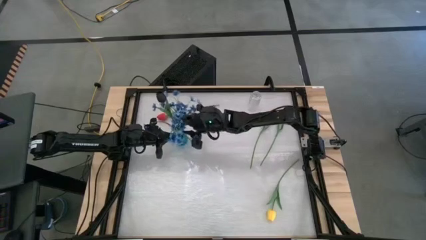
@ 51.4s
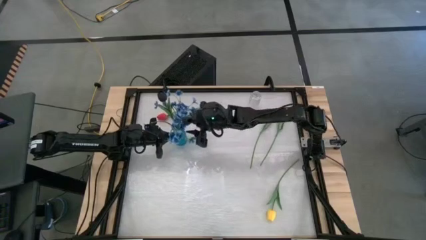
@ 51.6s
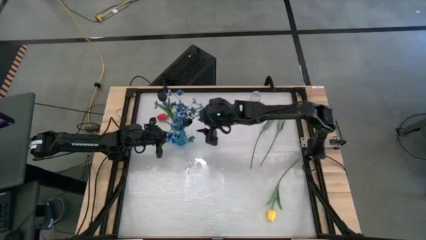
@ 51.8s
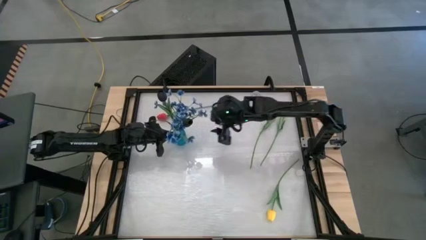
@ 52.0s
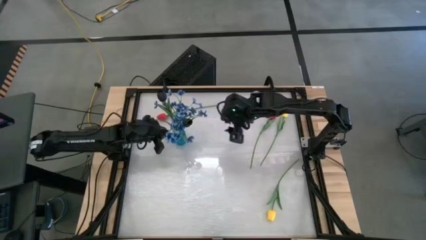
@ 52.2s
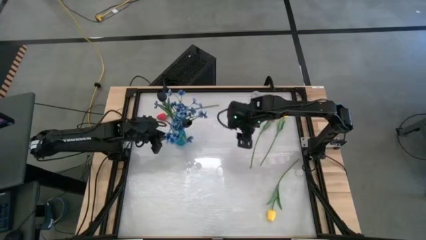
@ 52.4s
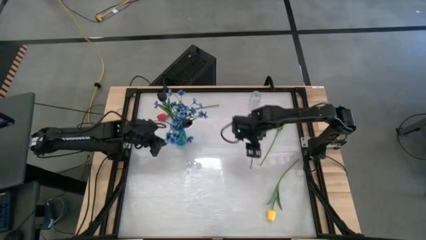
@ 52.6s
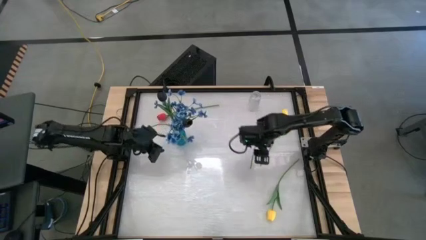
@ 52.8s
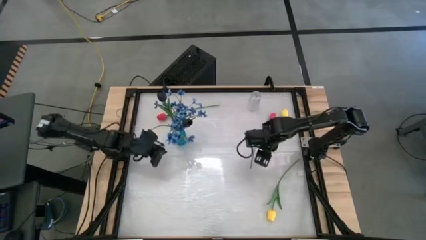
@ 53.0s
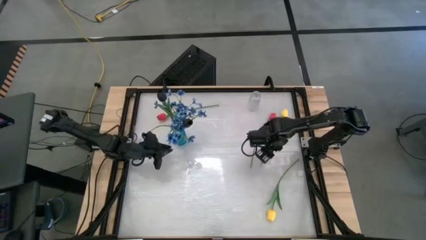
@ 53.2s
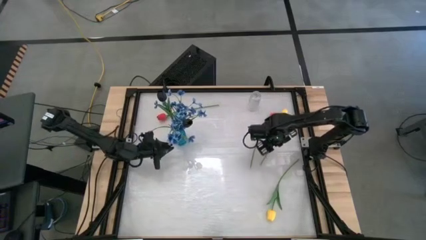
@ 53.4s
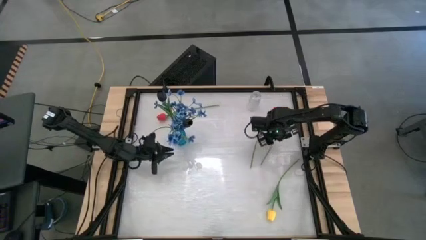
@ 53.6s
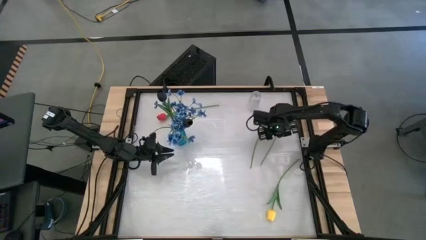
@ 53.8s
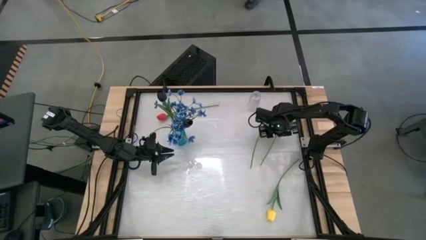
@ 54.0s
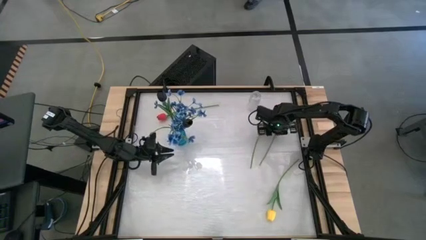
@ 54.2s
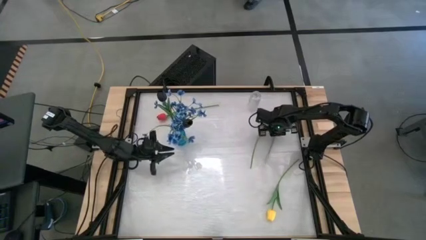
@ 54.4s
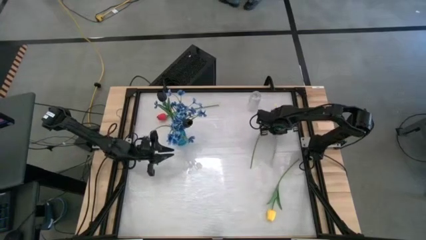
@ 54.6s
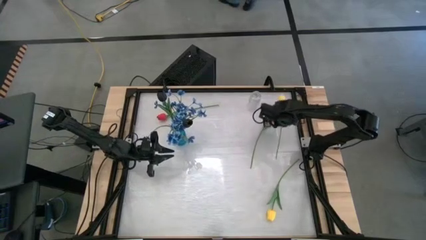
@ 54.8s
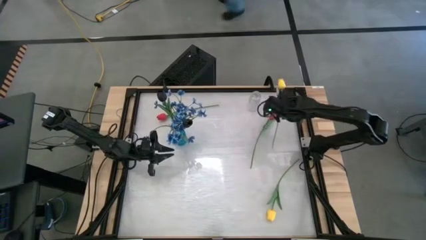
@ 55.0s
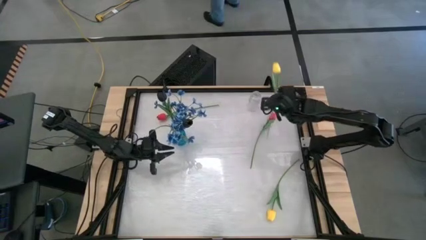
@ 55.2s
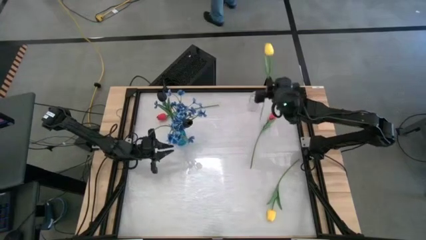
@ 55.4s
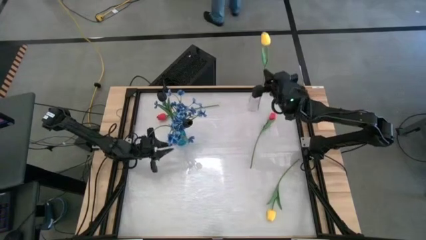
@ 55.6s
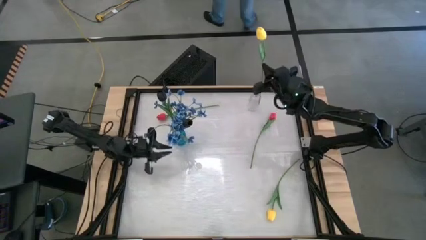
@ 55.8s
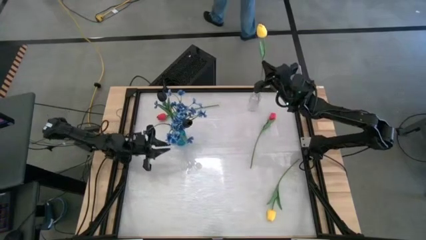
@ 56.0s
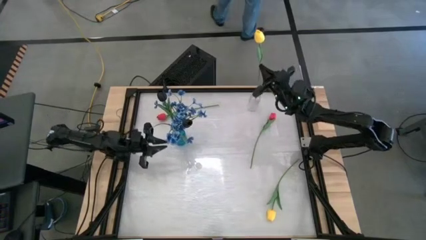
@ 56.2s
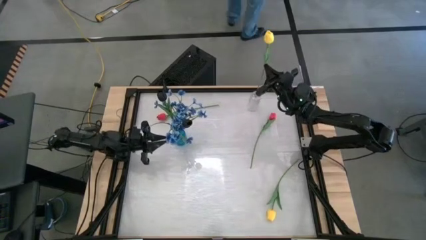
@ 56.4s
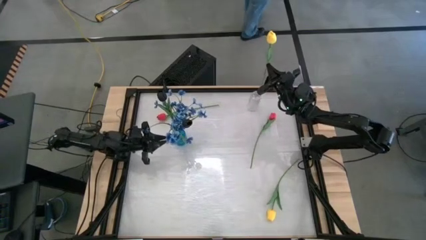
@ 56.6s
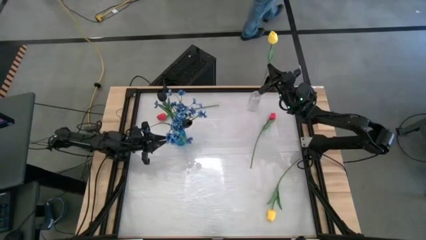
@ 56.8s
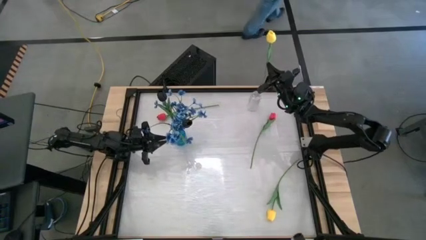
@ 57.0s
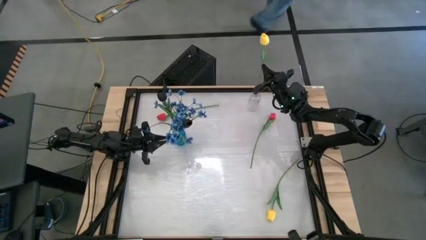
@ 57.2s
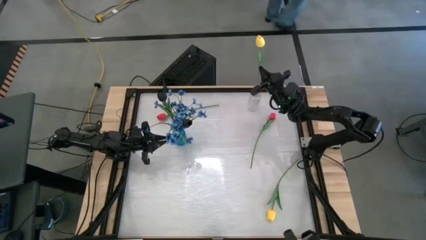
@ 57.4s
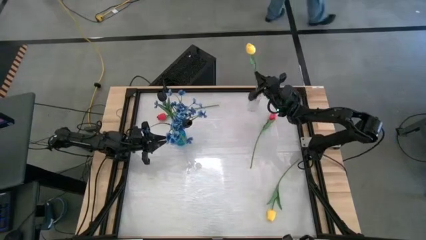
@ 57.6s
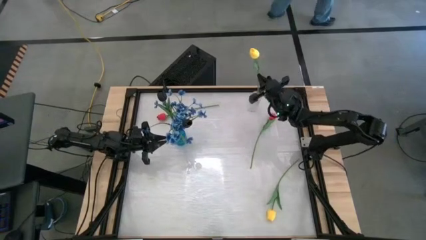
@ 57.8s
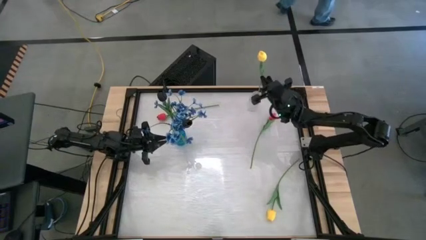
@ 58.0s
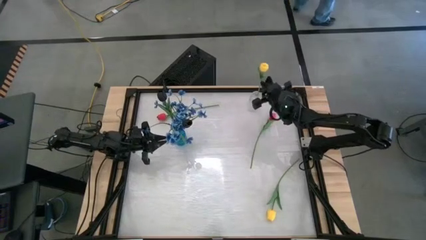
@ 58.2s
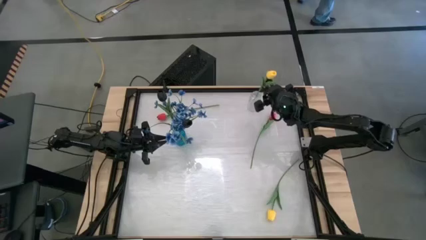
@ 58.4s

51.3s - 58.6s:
Task: Sort flowers into vase by color
Put the top yellow tulip flower into the transparent vase

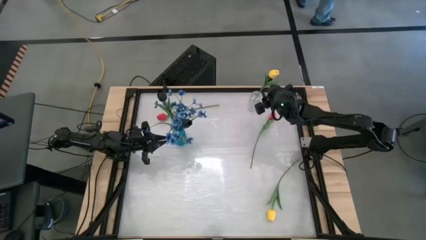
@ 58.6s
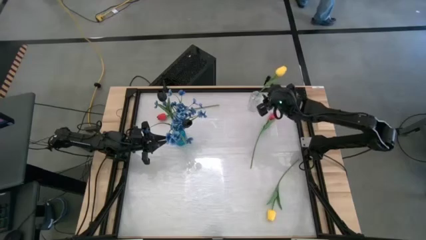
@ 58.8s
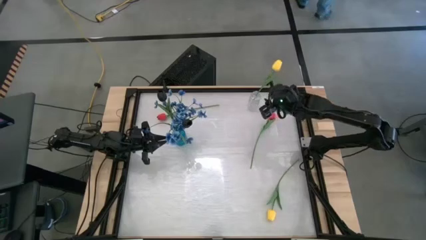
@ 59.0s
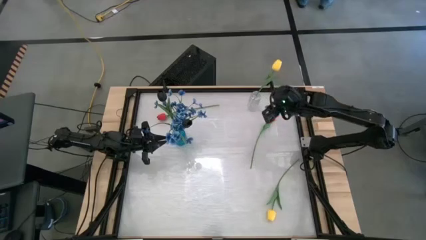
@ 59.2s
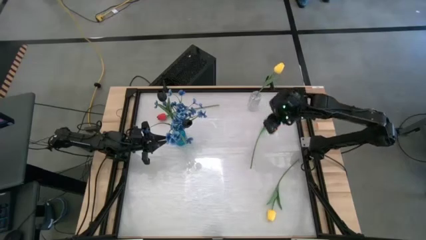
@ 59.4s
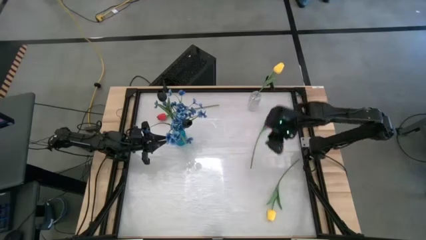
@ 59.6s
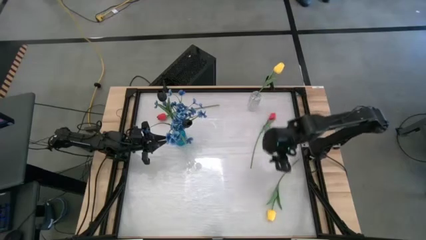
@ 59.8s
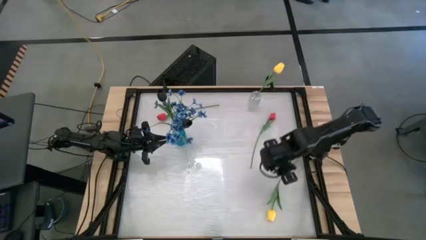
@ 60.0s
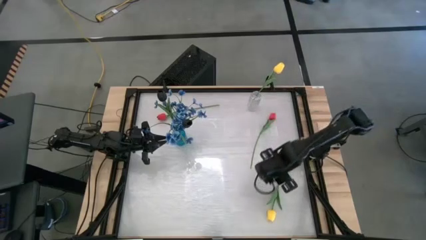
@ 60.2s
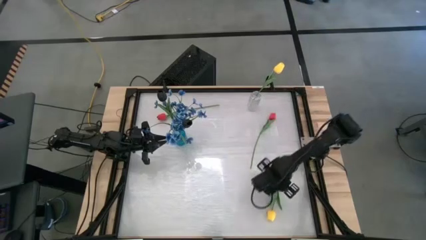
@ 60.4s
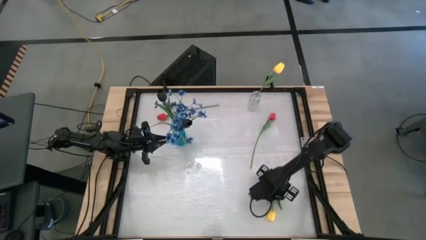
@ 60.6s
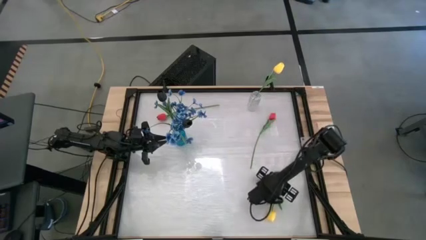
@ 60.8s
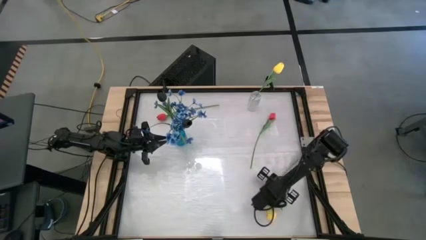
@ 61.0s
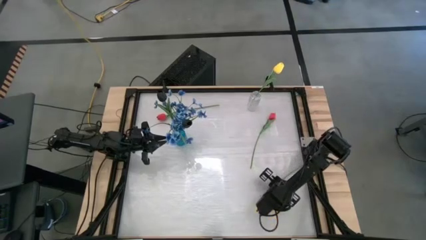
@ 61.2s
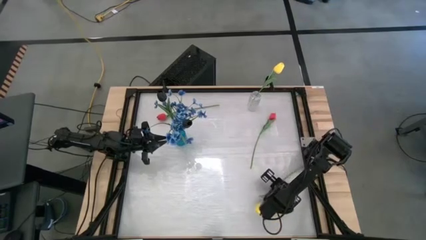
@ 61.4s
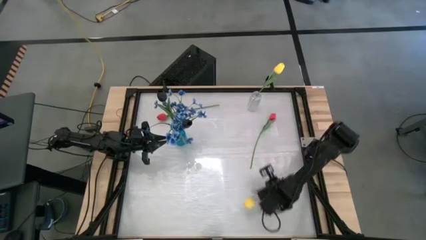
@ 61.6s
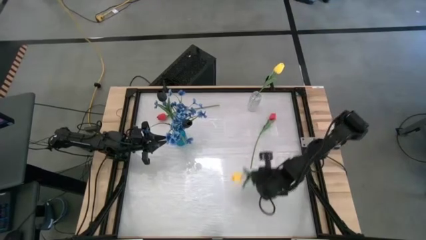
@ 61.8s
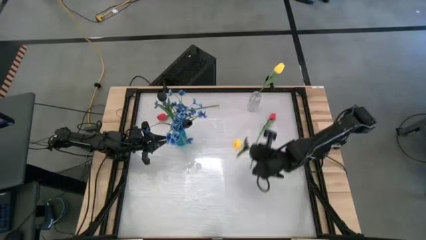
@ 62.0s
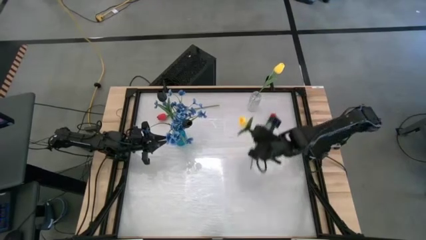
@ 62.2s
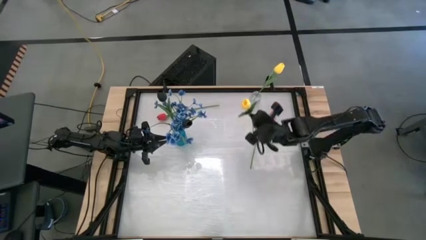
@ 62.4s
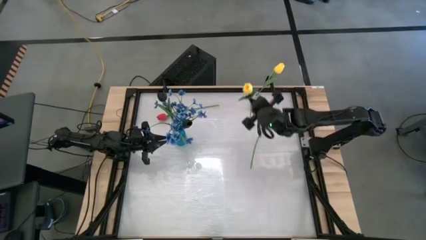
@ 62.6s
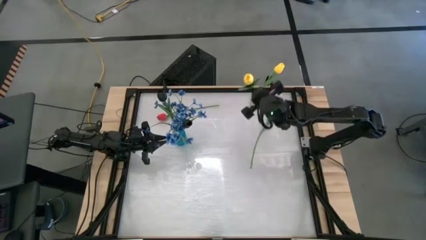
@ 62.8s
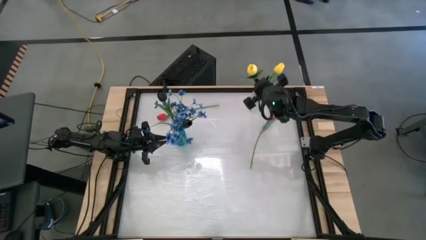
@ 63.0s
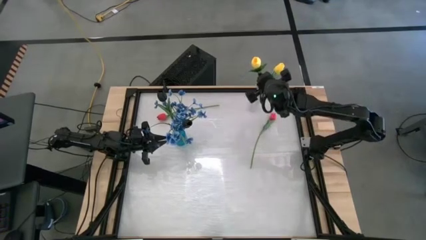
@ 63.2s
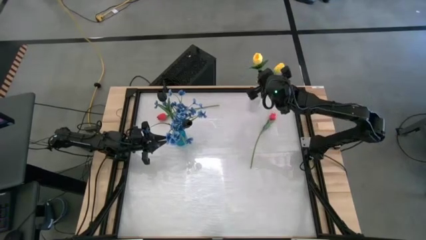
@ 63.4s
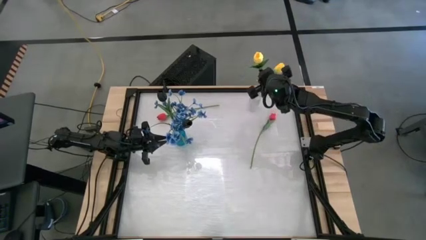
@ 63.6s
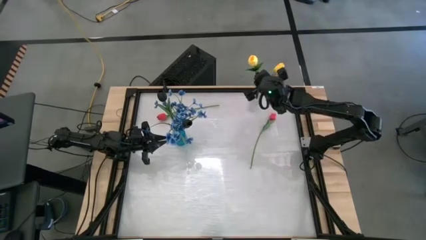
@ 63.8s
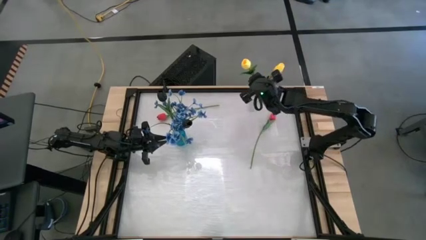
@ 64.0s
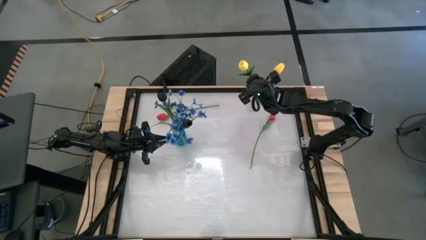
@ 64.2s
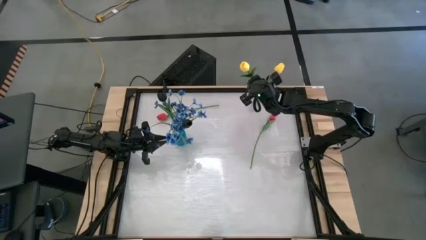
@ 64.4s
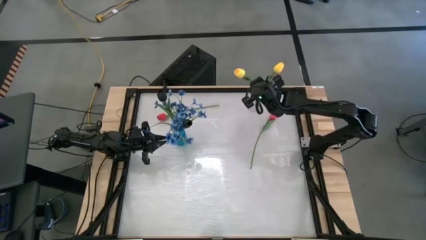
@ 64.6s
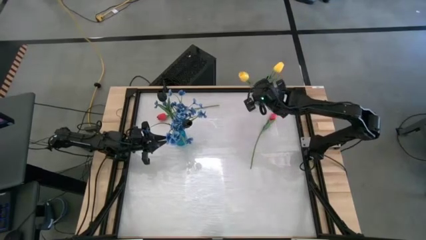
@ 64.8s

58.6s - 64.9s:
Put the yellow tulip flower into the transparent vase

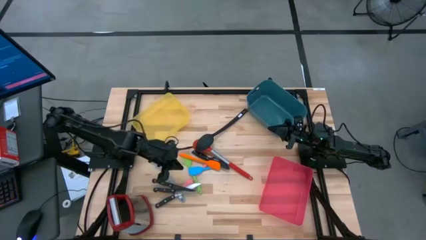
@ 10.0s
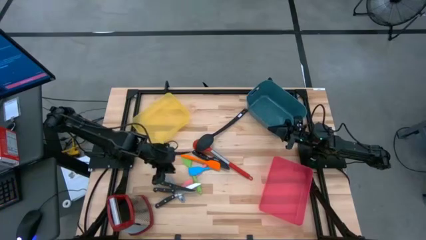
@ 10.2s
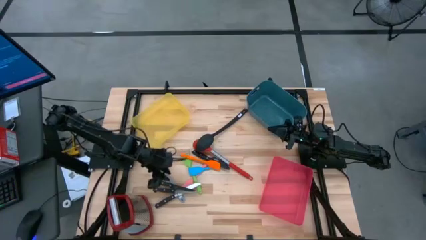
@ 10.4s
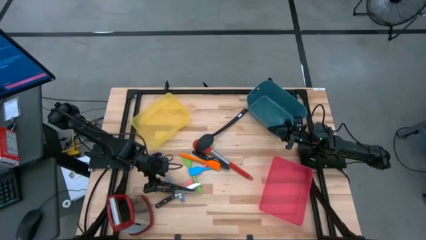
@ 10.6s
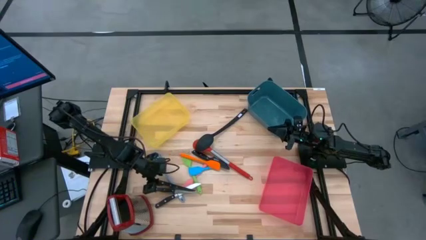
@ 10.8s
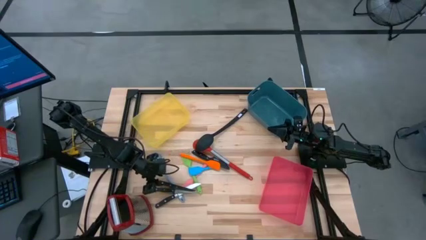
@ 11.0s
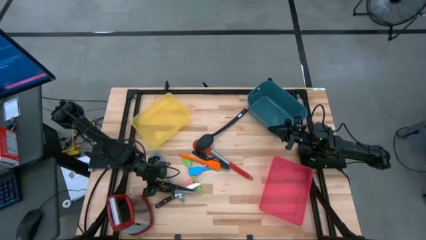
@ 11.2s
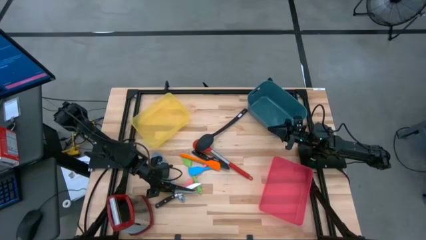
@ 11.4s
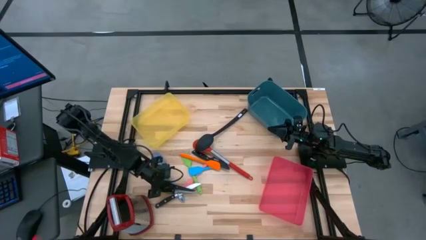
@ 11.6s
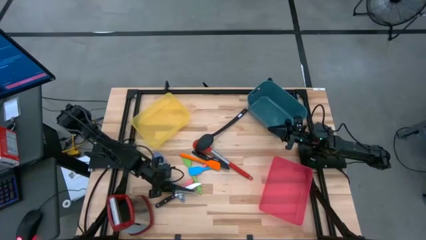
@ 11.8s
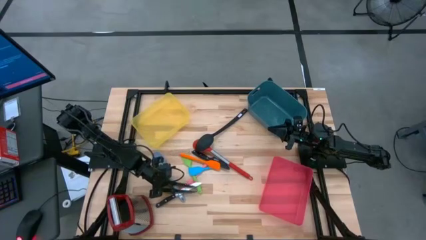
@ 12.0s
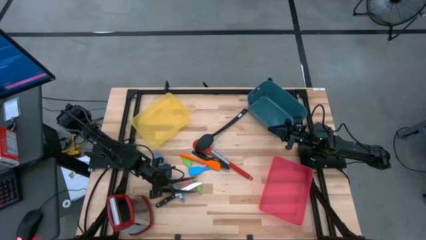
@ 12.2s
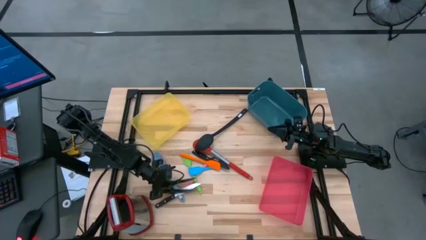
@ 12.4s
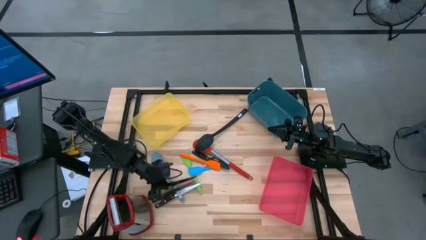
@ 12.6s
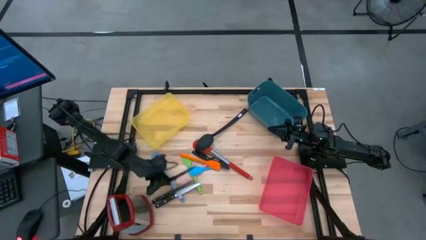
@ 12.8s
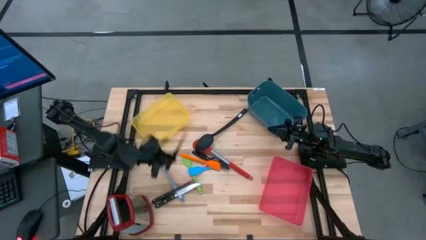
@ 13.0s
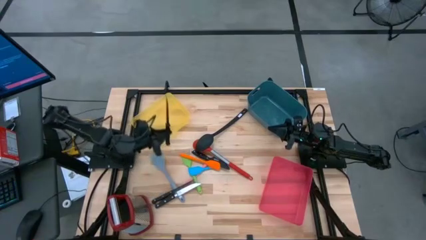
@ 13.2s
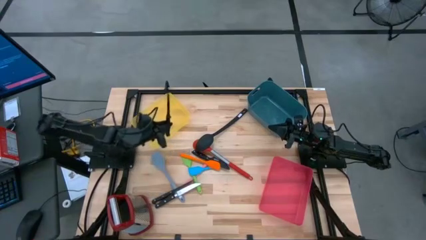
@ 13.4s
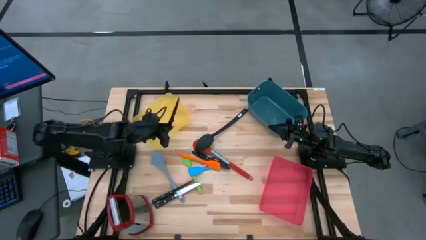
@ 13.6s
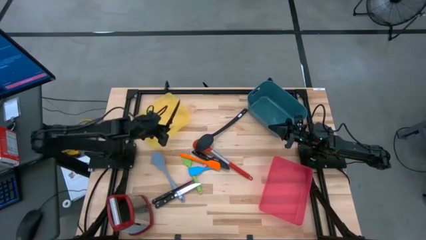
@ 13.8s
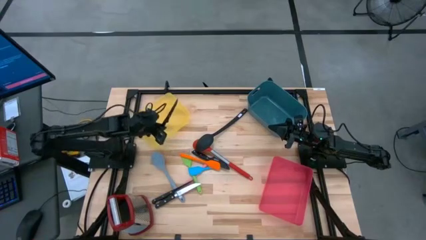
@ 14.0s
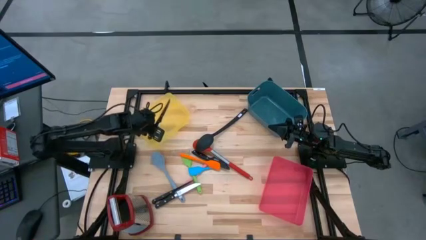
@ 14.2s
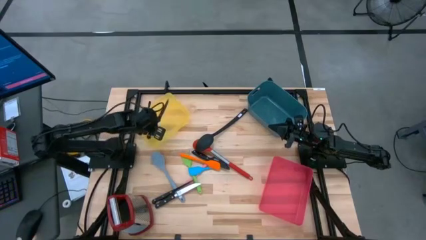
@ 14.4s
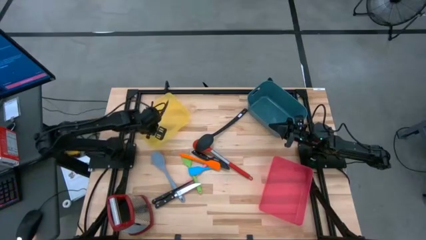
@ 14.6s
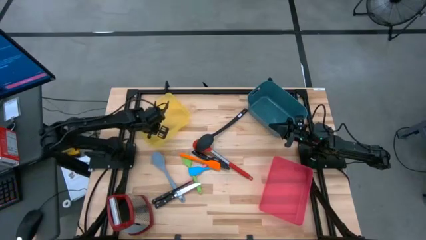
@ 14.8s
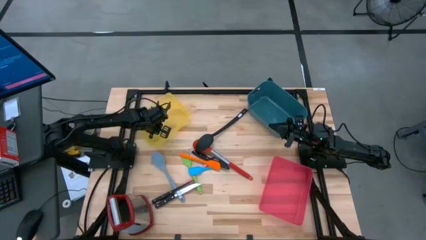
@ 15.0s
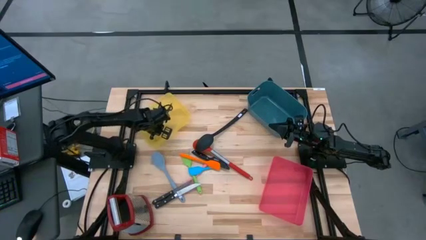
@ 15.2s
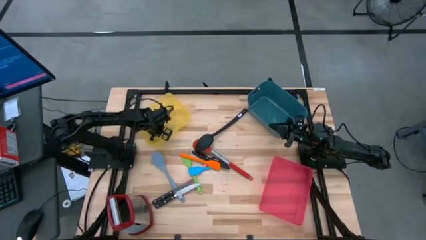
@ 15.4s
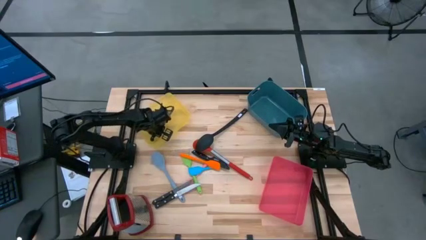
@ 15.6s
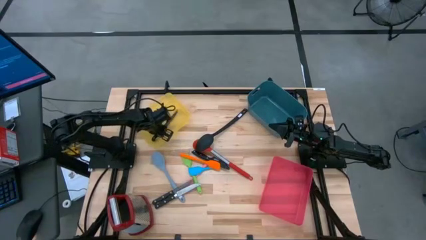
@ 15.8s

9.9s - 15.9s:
Task: Pick & Place Kitchen Items
Put the bottom black knife into the yellow bin
